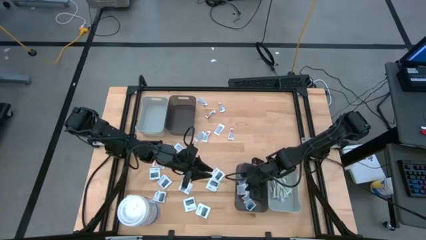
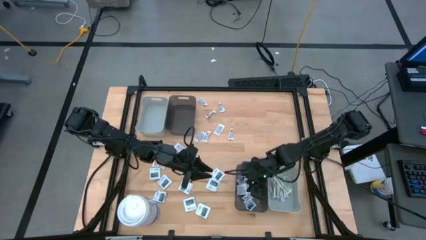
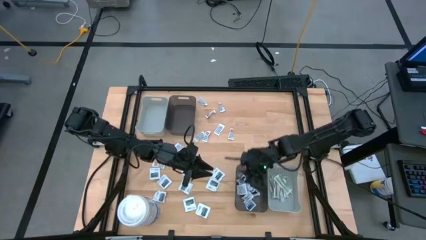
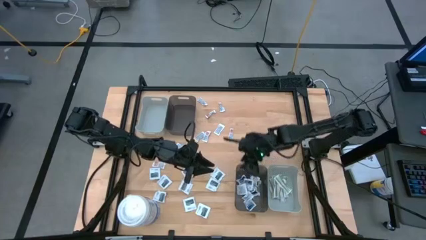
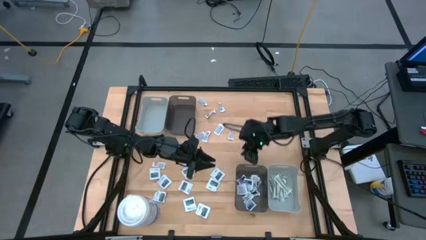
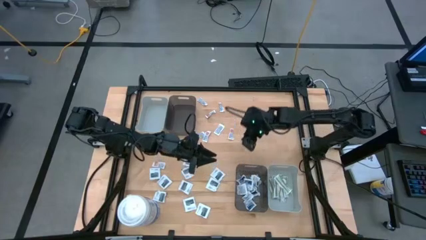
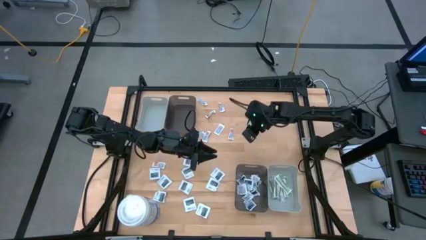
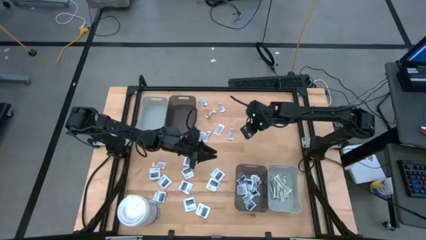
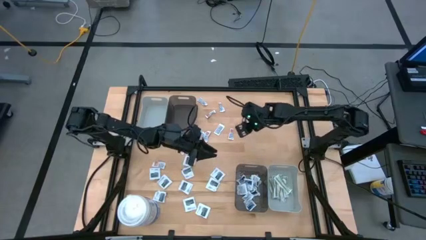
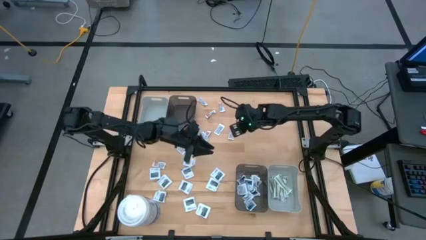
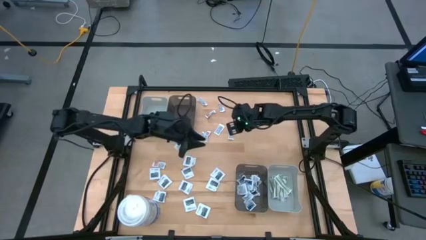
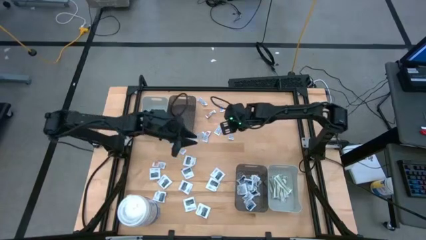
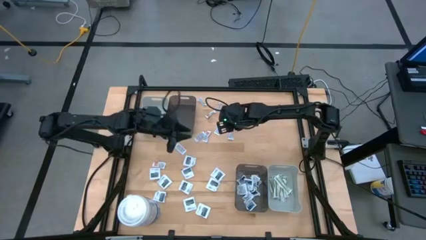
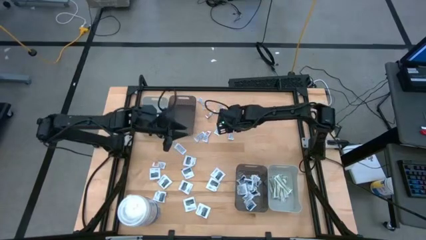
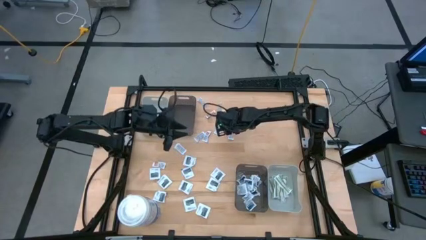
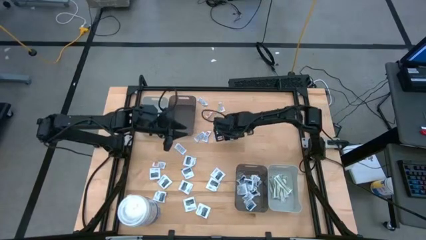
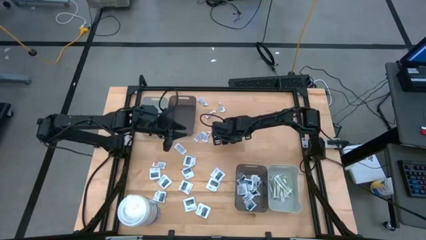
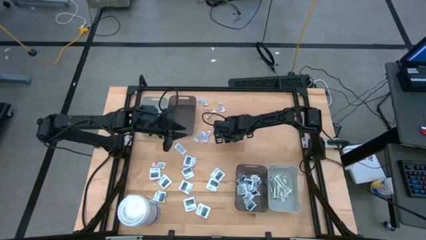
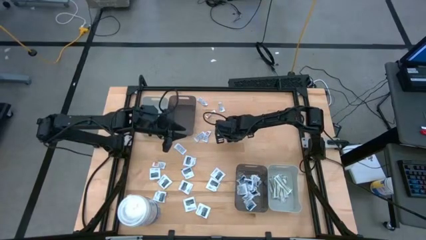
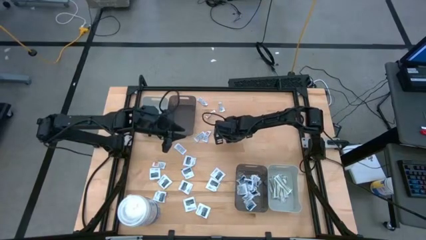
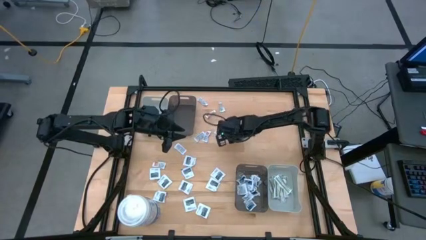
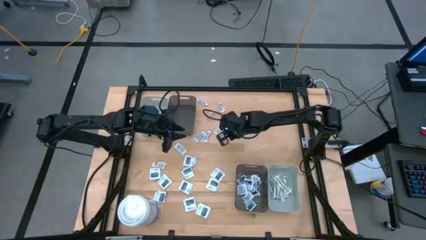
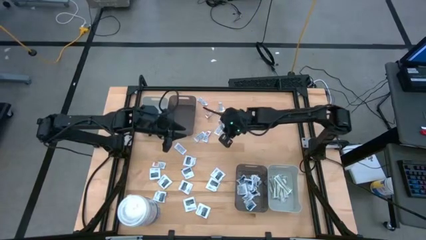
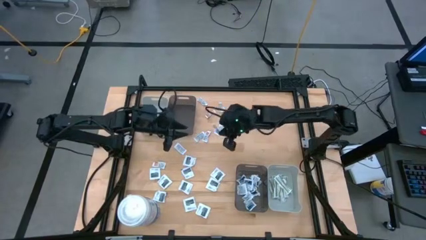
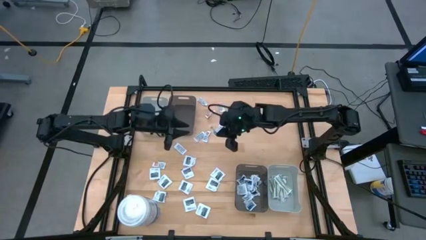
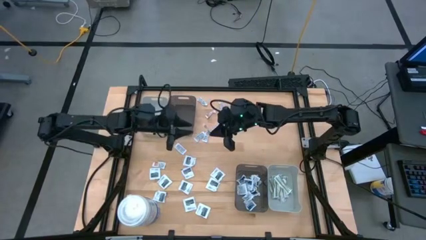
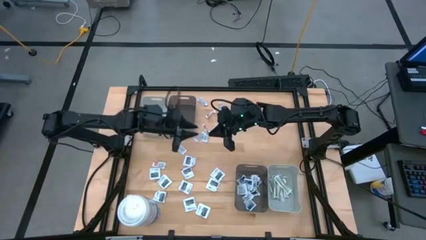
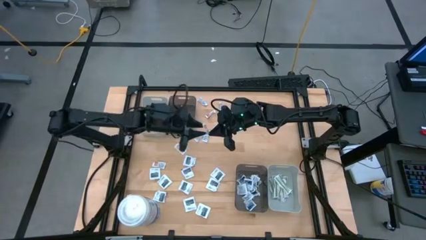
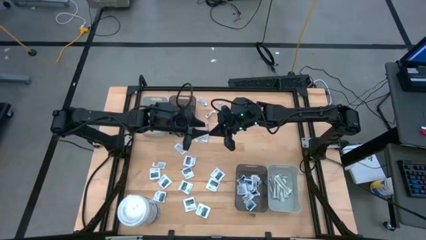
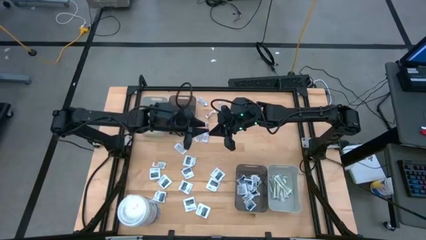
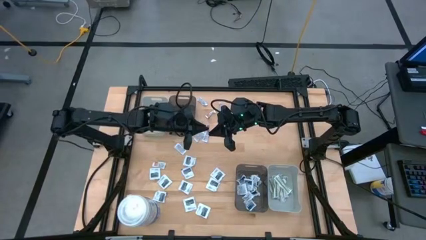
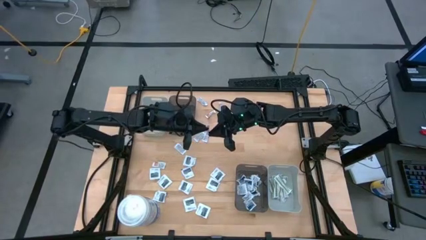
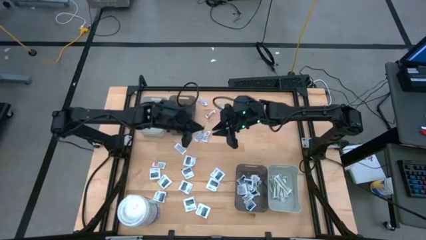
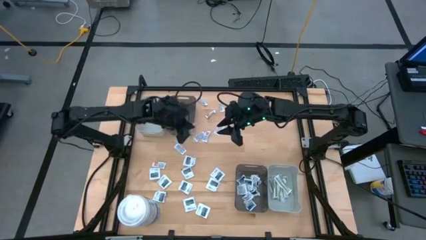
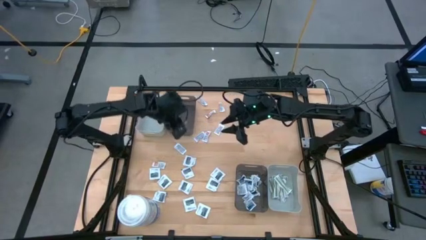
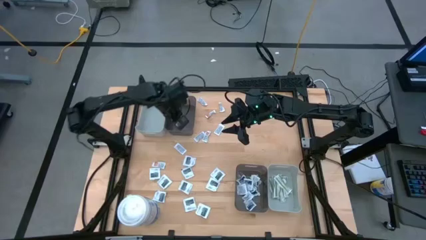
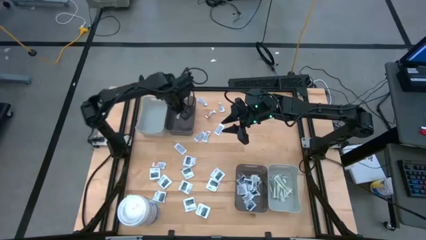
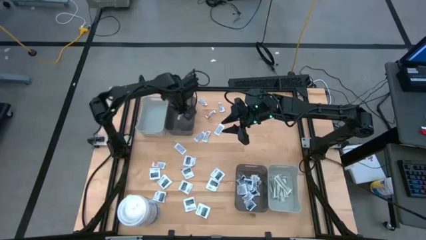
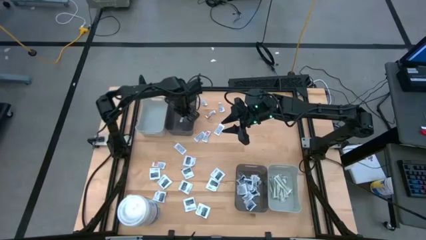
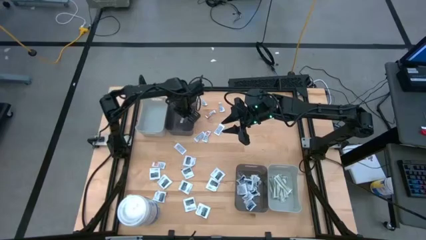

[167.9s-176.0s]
Task: Pick & Place First Aid Supplies
Put the white ointment pack into the top black bin

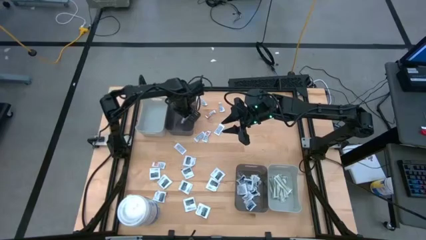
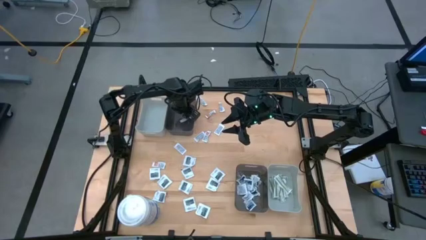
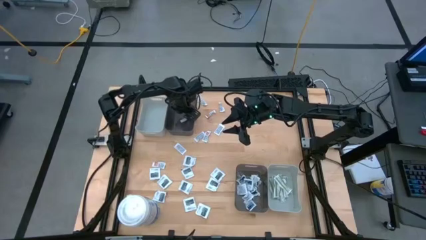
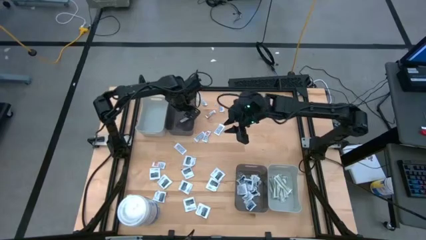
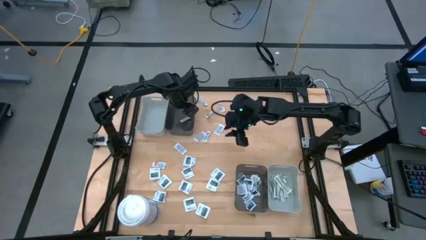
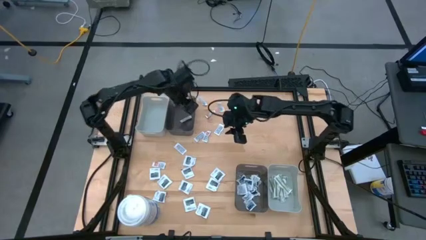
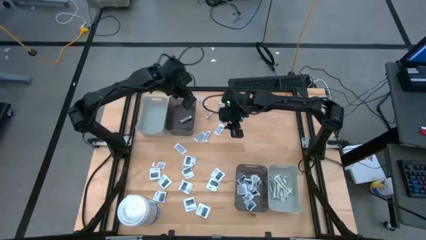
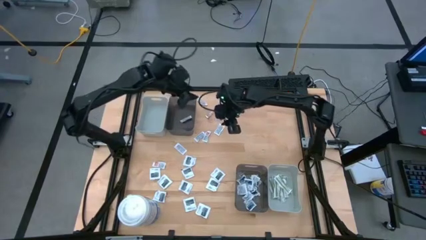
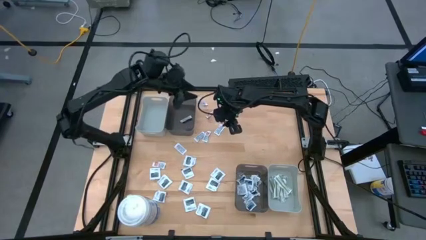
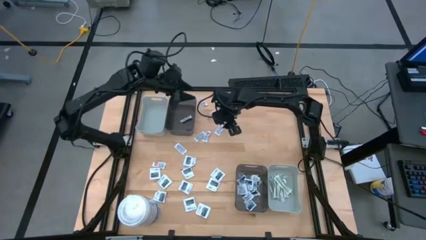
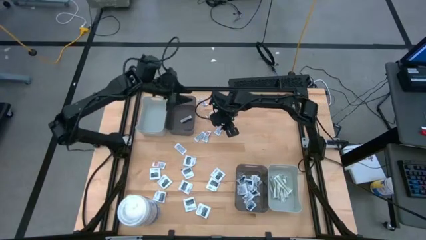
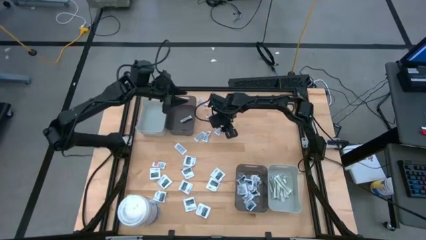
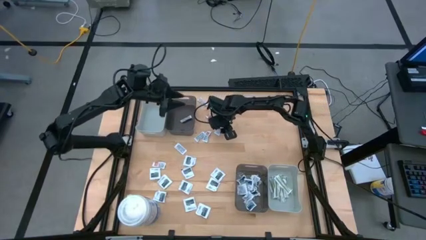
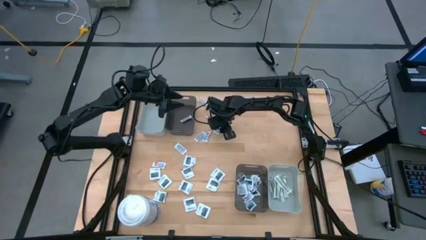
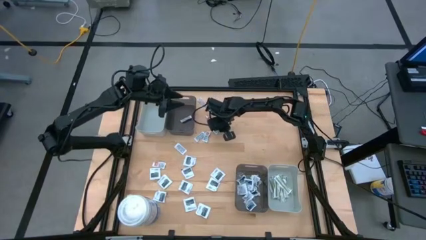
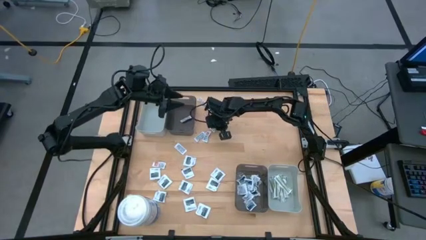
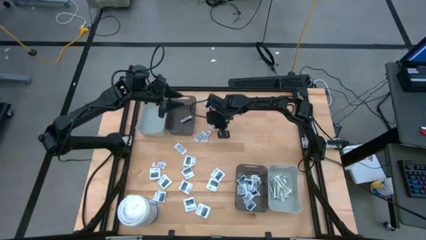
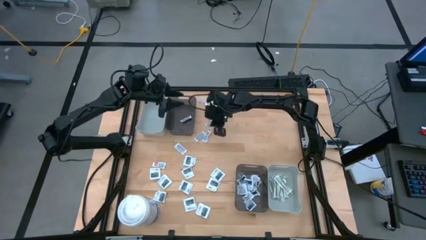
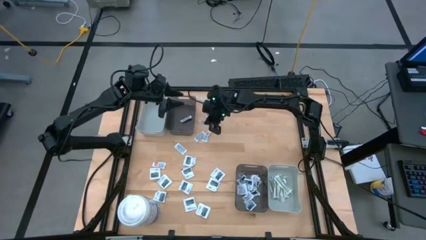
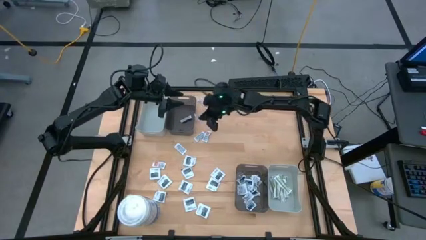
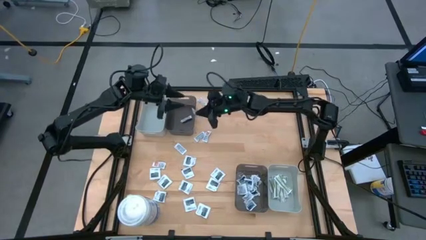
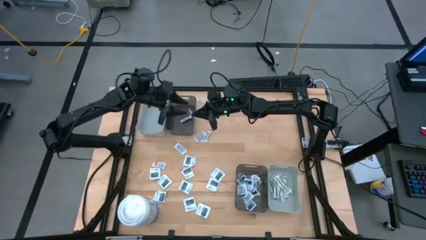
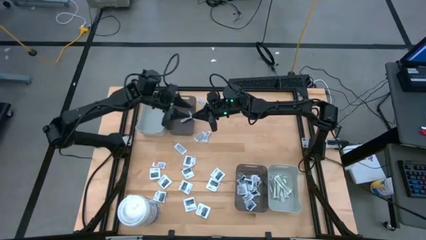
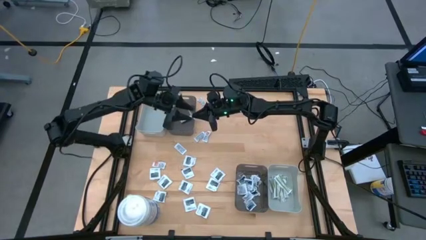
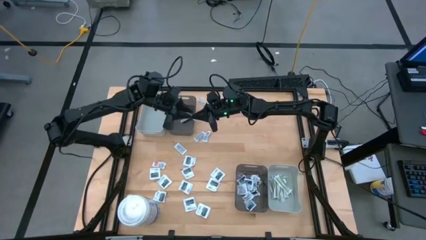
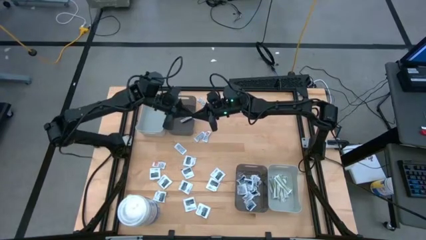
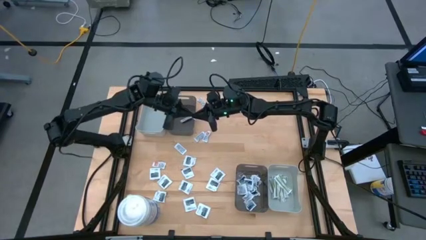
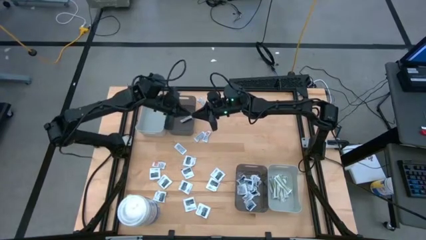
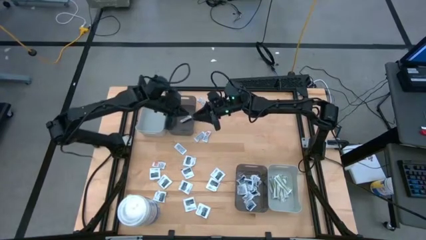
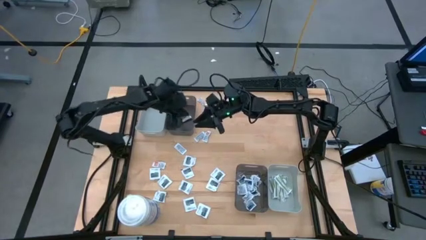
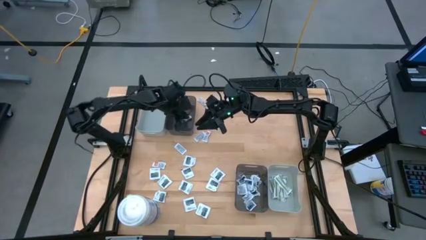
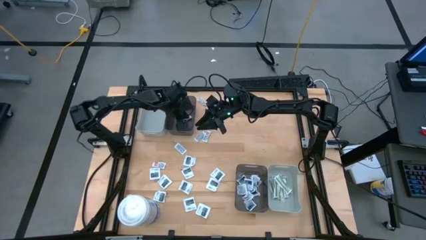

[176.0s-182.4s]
Put the white ointment pack into the top black bin
